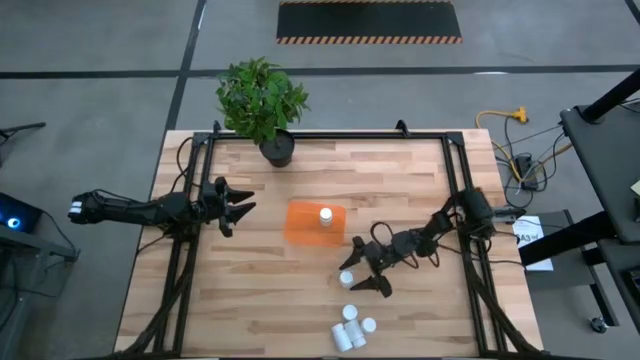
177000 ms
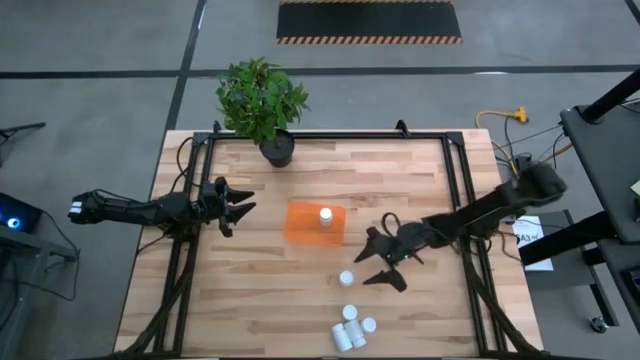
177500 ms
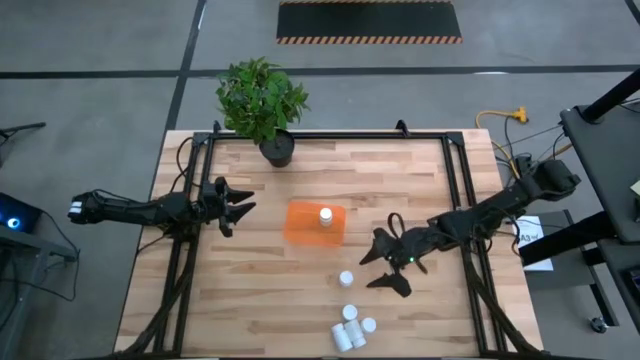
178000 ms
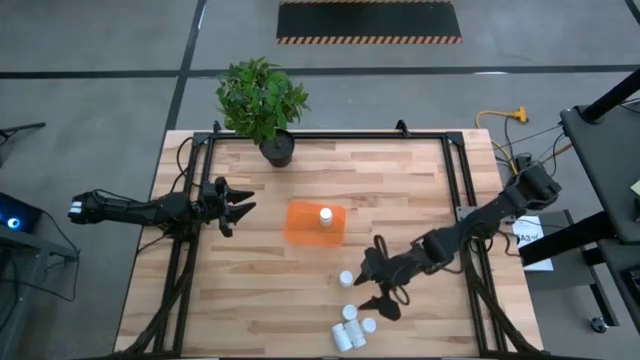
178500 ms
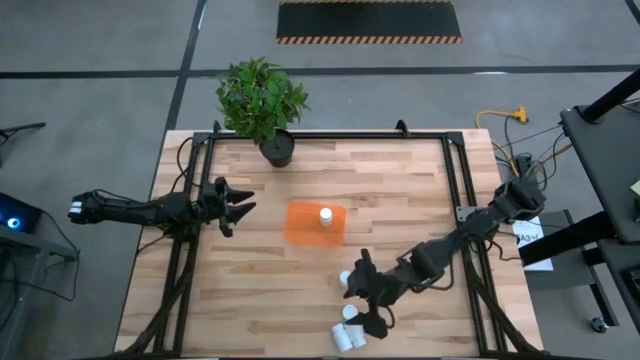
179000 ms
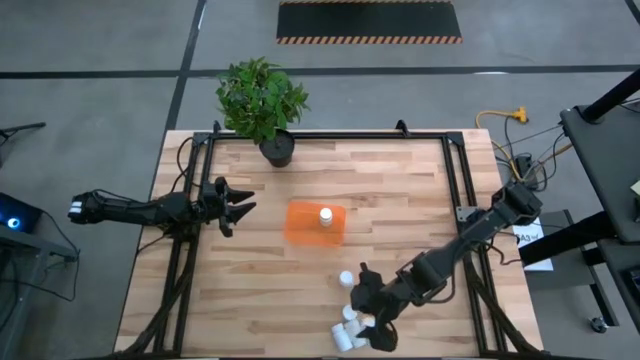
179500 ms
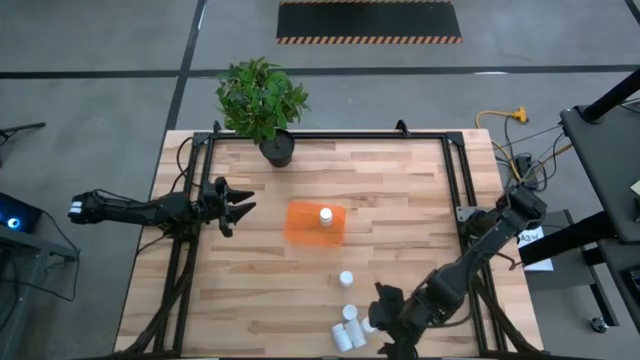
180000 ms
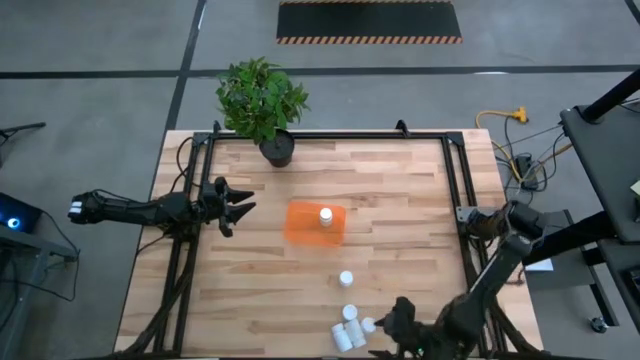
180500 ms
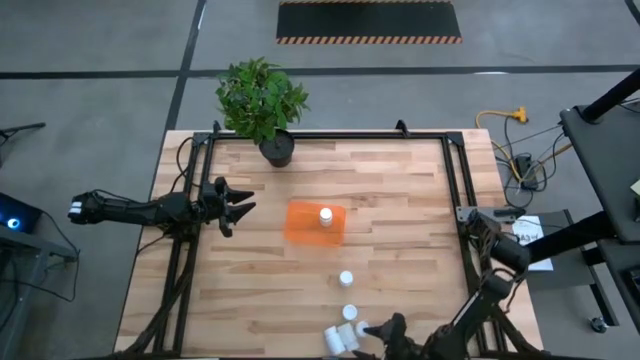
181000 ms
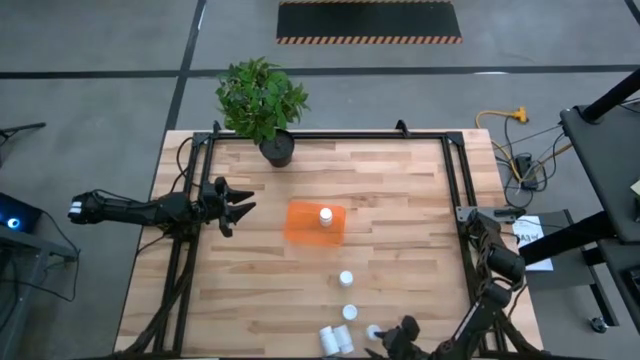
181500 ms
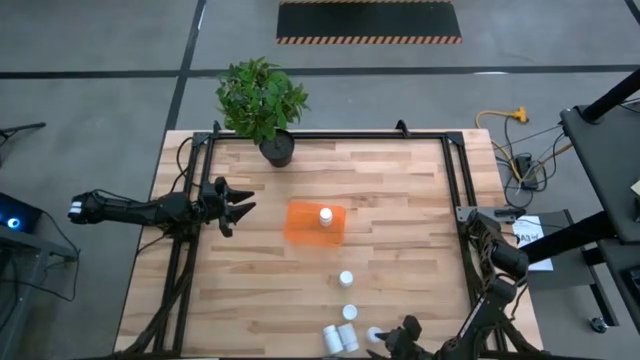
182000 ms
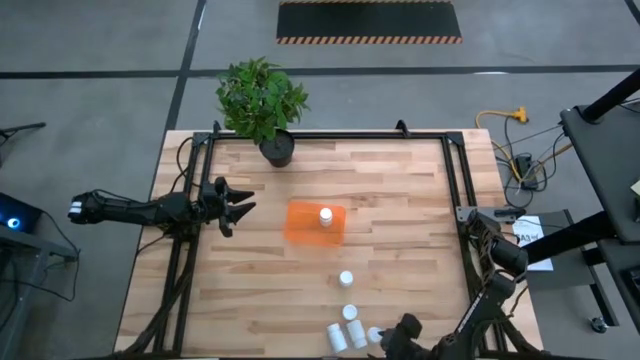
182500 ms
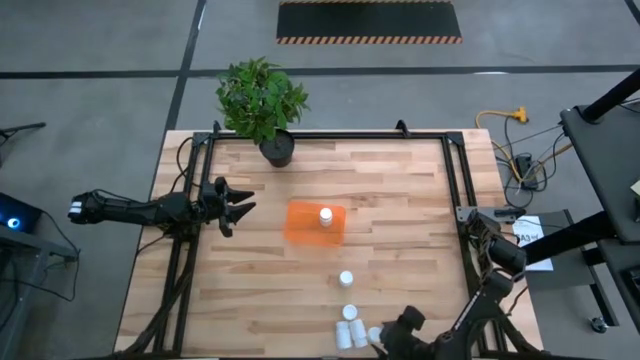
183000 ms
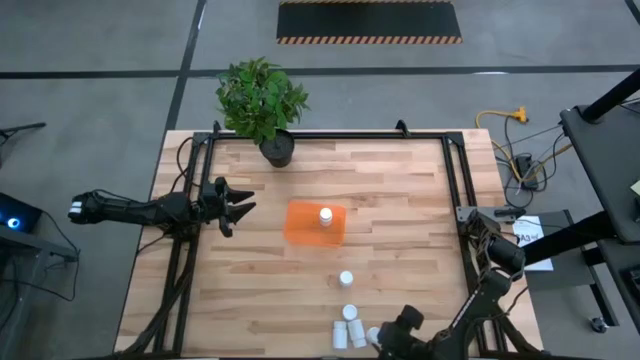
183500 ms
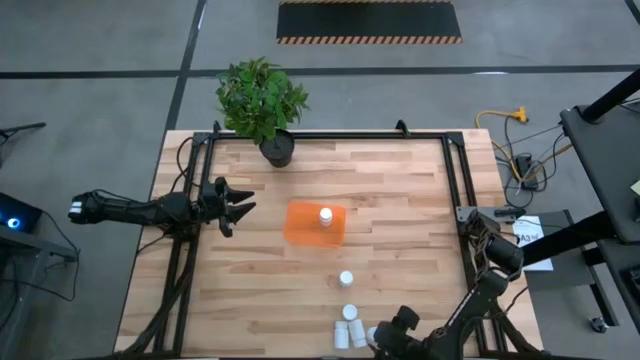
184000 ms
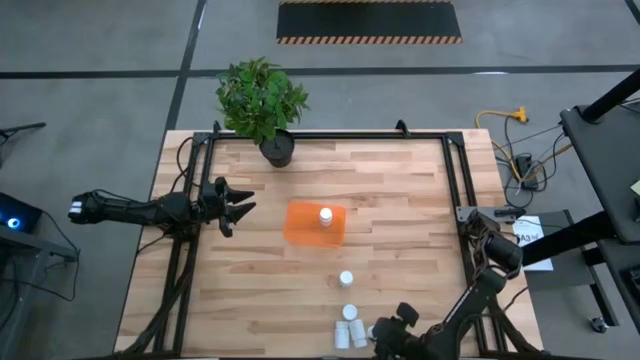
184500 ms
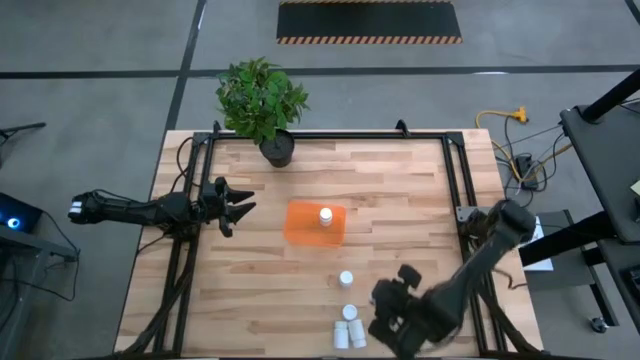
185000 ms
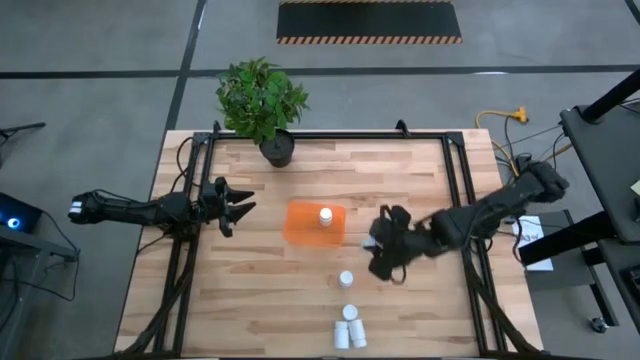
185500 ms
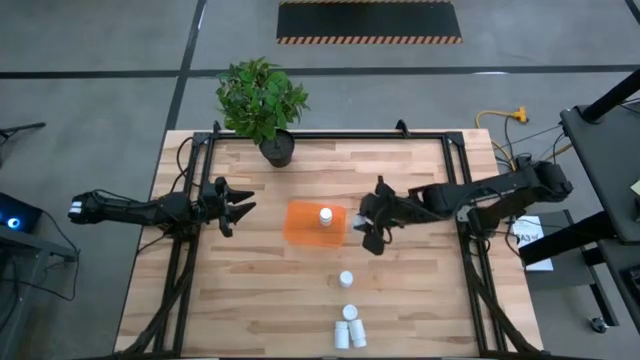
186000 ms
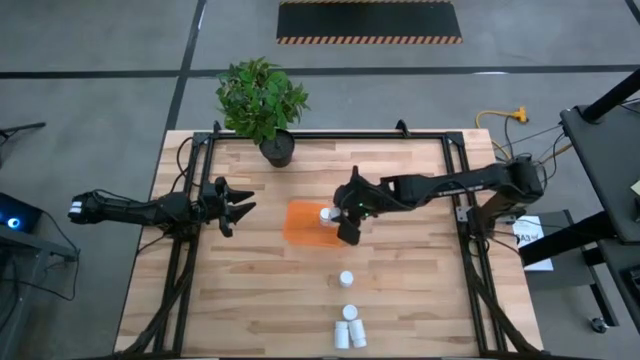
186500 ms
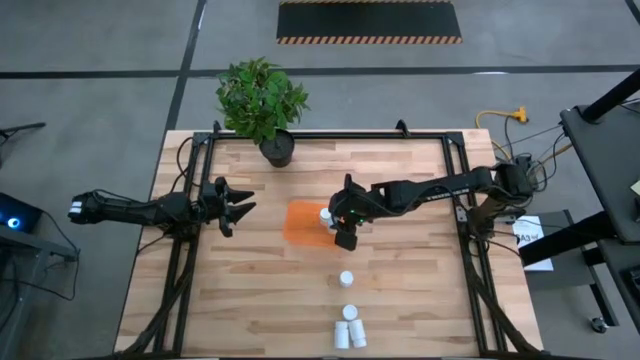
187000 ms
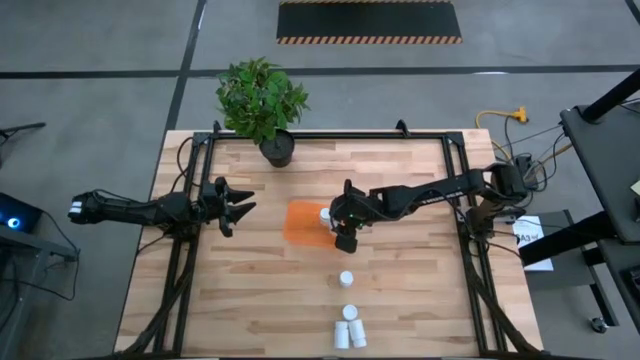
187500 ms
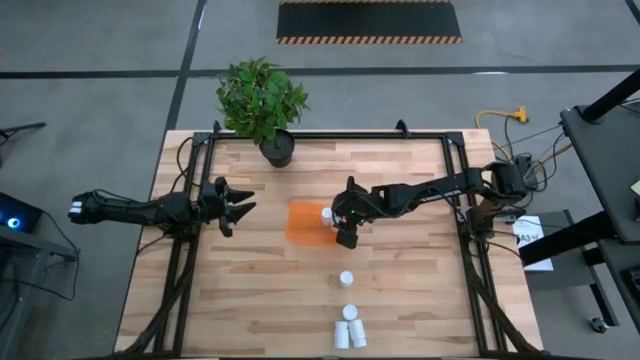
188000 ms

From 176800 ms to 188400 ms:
Task: Pick and place pill bottles into a basket
Put the white pill bottle into the orange container

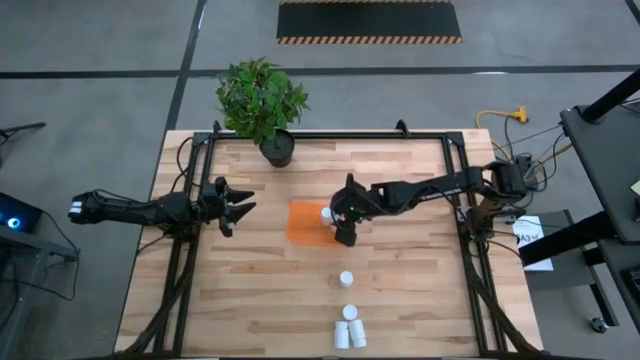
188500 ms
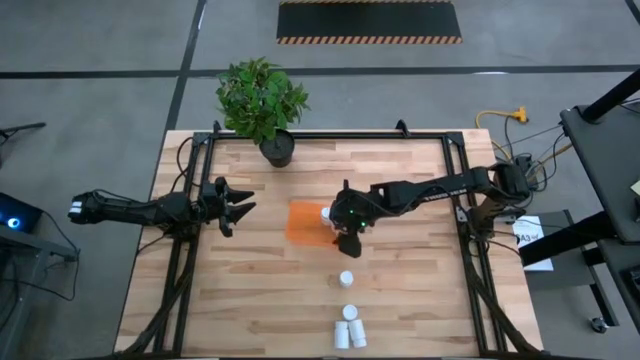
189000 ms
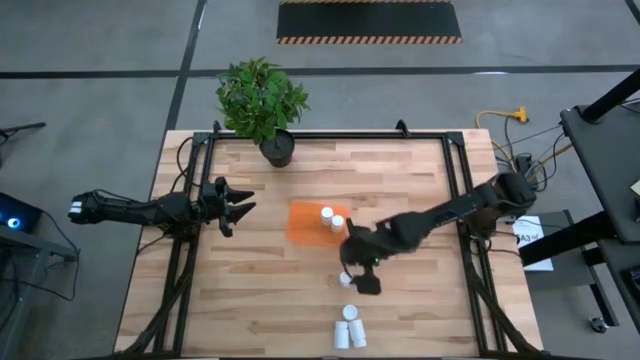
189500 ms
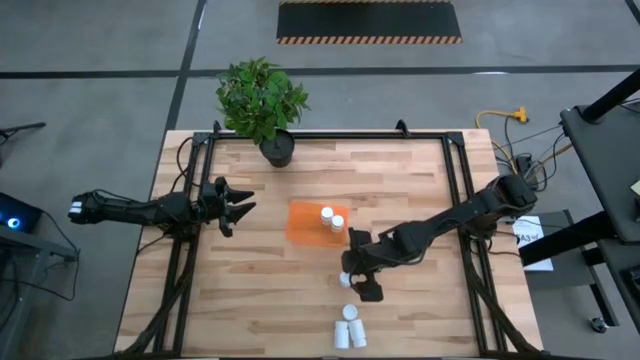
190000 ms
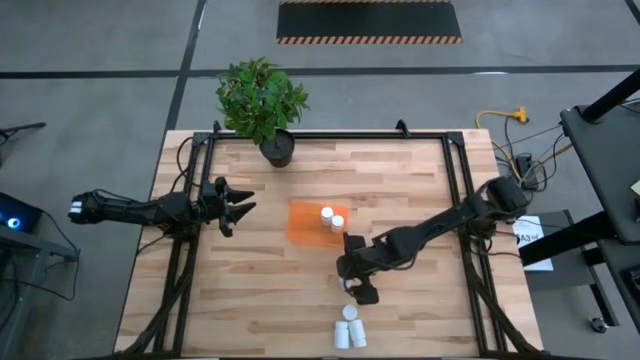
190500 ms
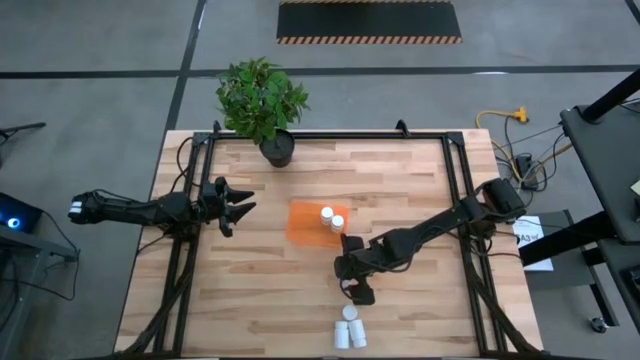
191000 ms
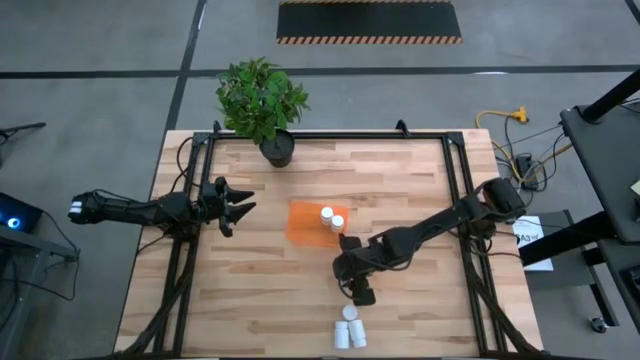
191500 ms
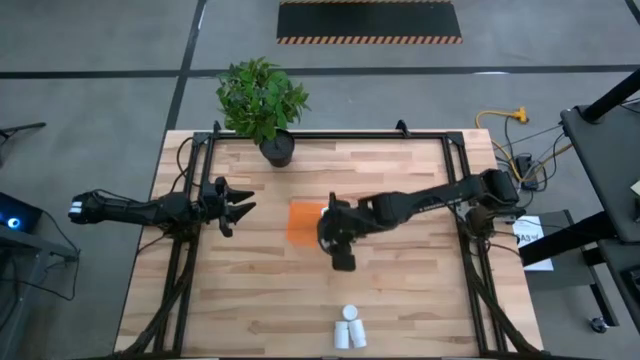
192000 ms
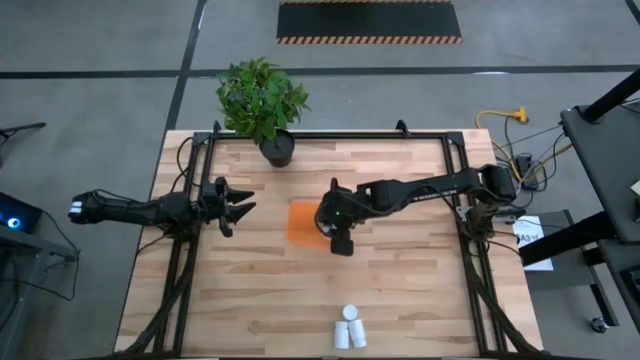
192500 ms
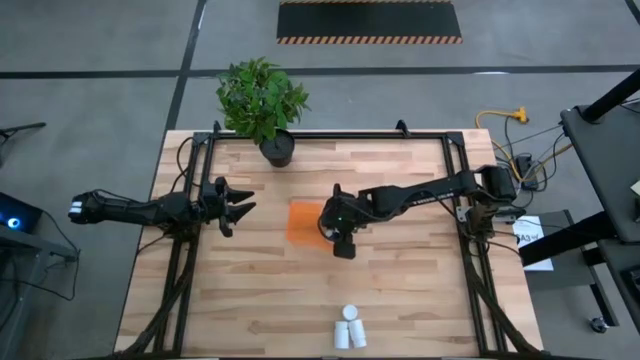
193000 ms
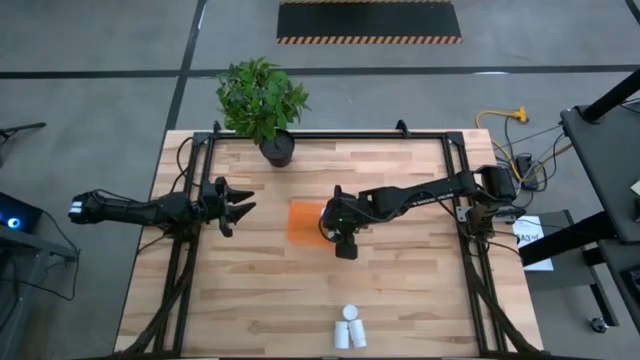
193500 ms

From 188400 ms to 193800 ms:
Put the white pill bottle into the orange container

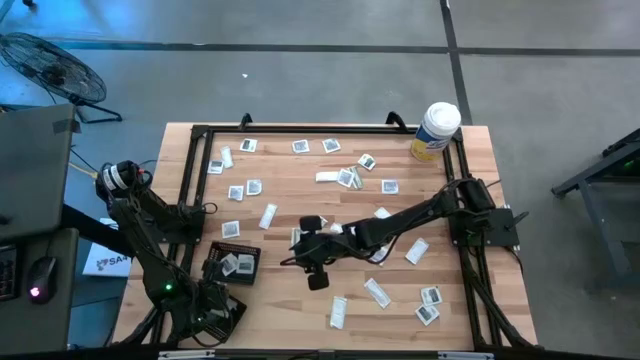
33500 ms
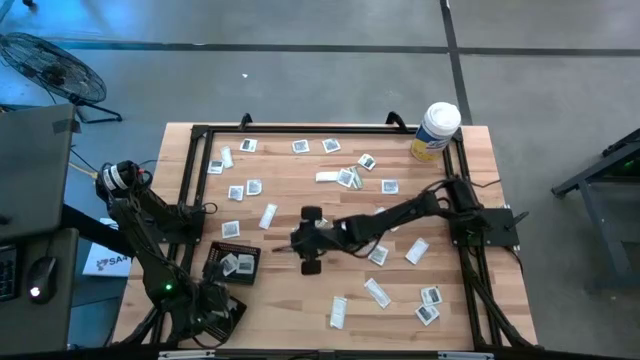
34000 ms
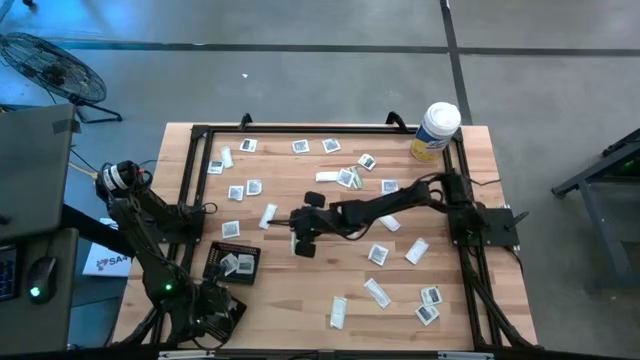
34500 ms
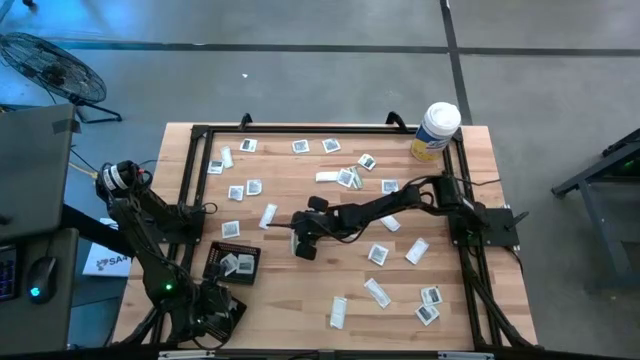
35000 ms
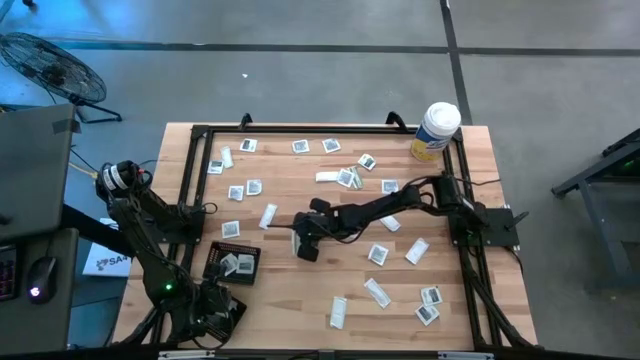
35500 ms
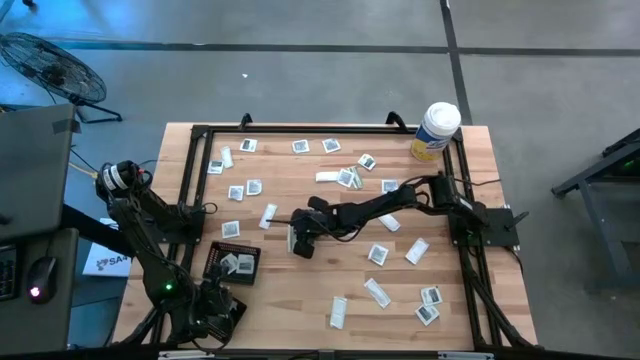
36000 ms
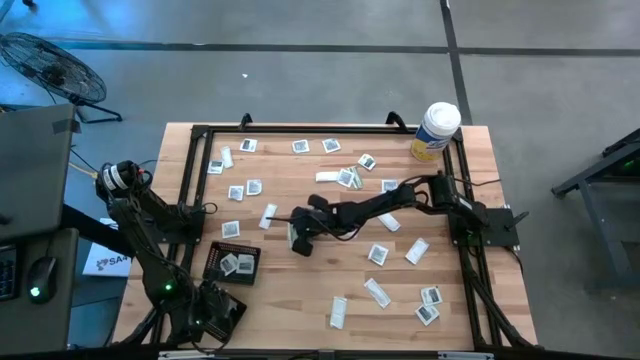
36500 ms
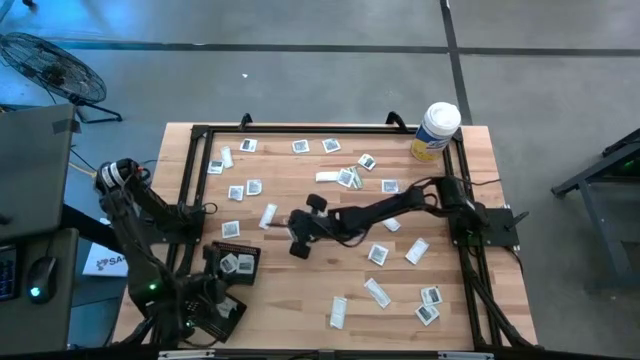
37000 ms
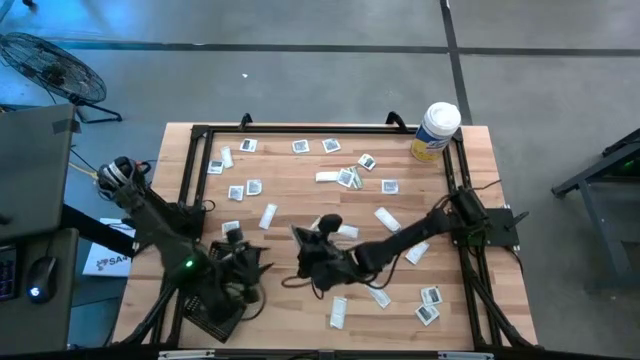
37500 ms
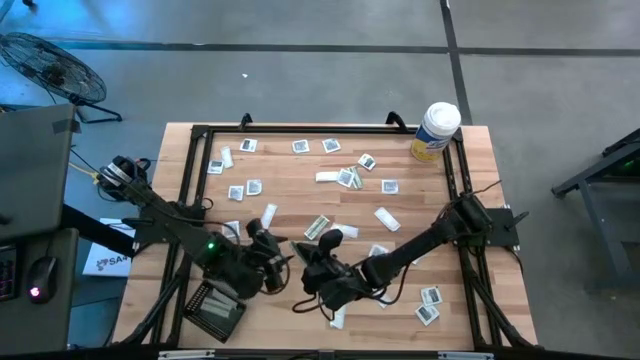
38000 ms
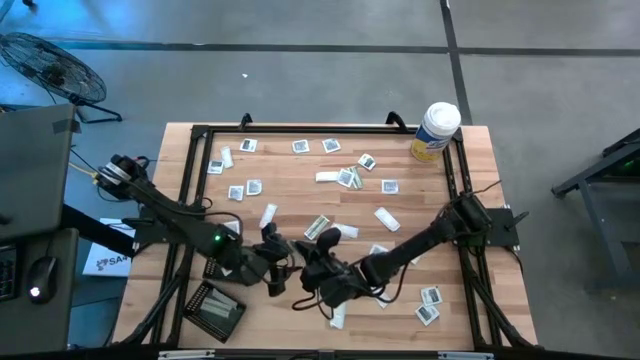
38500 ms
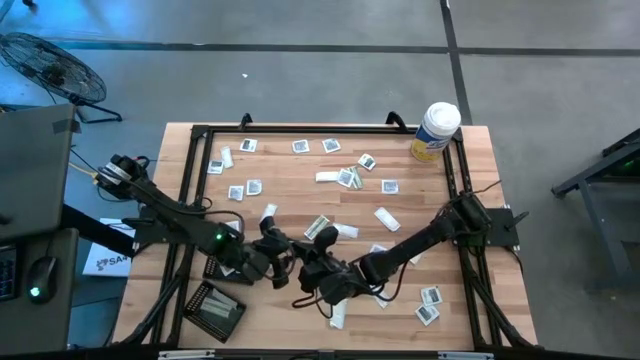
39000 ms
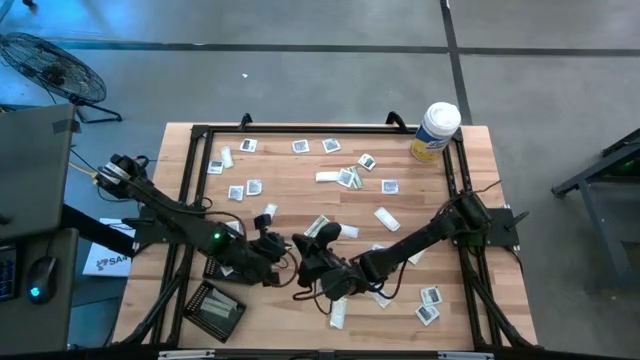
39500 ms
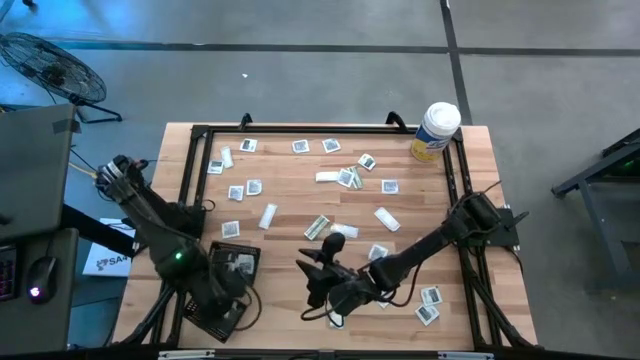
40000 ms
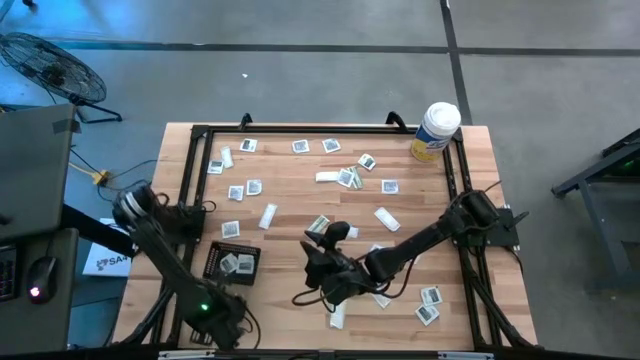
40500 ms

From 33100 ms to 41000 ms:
Task: Pick & Place First Aid Supplies
Put the bandage into the bottom black bin
